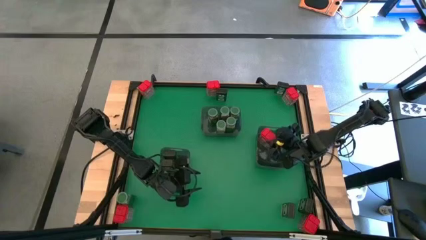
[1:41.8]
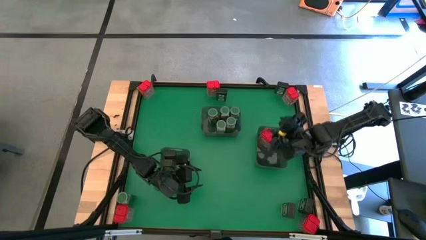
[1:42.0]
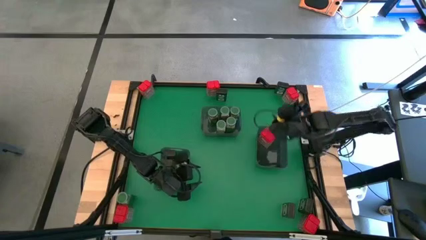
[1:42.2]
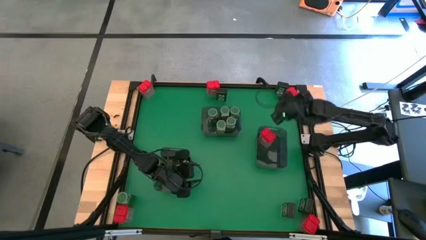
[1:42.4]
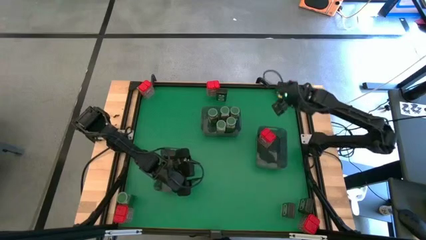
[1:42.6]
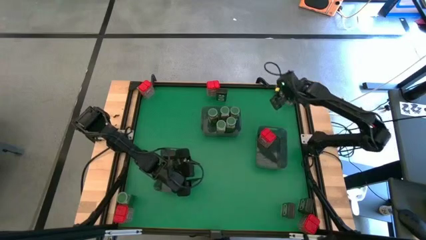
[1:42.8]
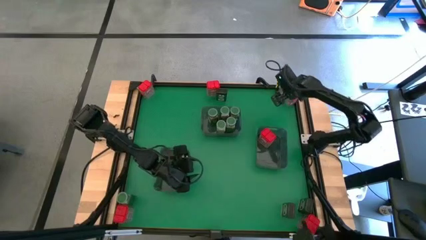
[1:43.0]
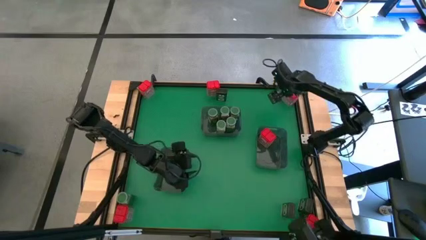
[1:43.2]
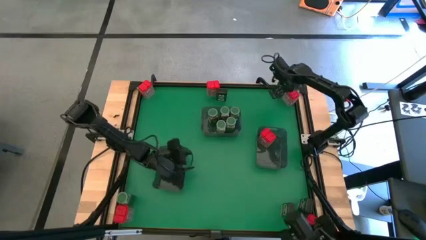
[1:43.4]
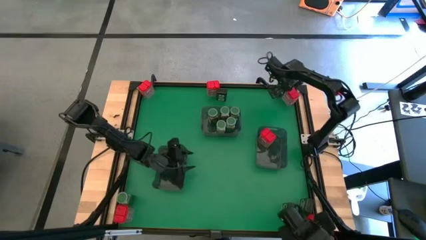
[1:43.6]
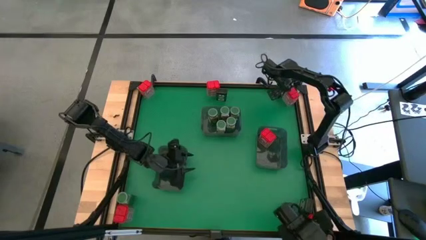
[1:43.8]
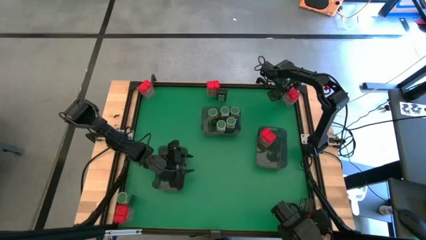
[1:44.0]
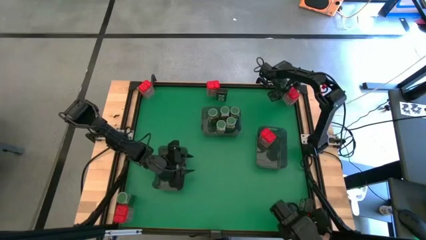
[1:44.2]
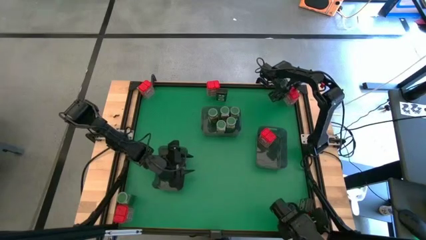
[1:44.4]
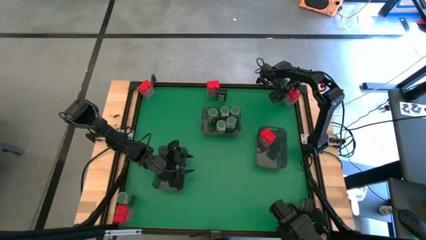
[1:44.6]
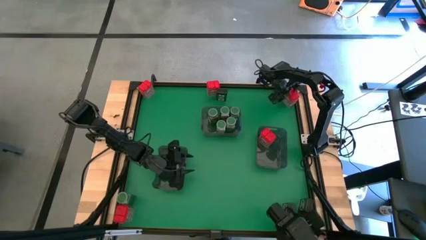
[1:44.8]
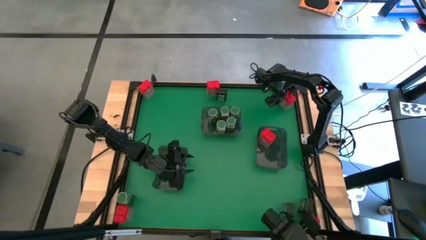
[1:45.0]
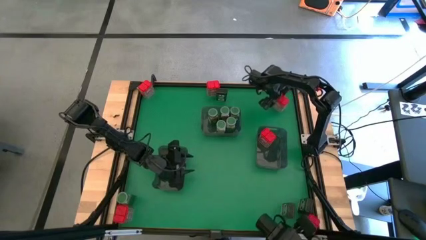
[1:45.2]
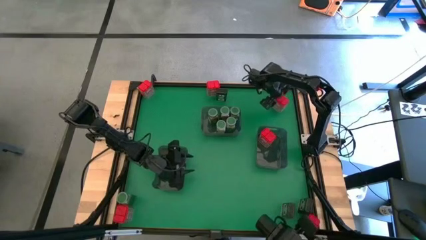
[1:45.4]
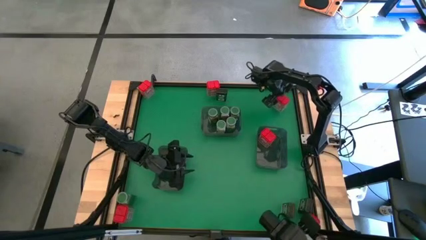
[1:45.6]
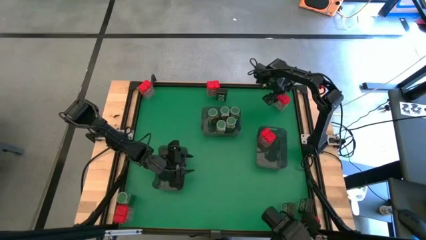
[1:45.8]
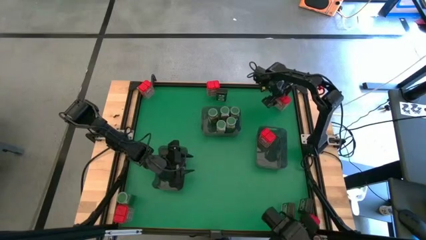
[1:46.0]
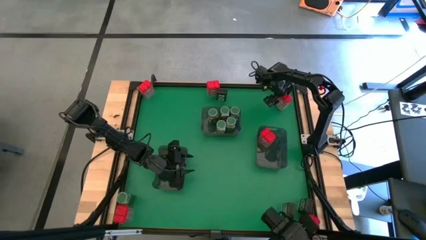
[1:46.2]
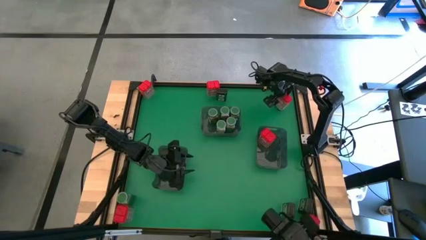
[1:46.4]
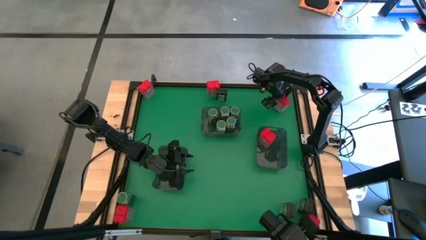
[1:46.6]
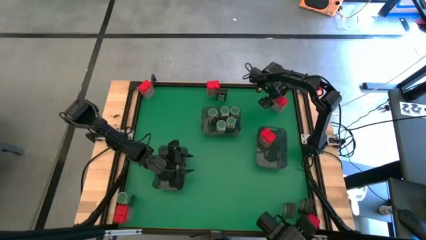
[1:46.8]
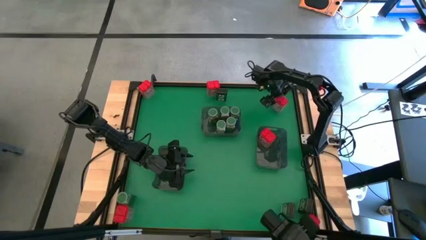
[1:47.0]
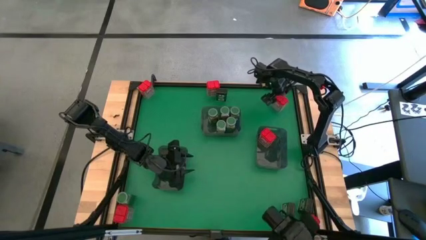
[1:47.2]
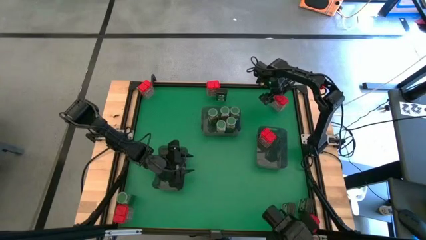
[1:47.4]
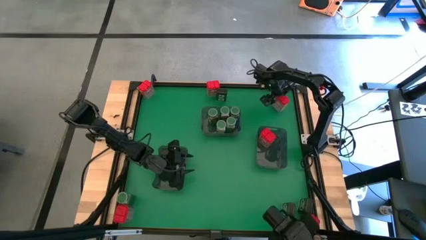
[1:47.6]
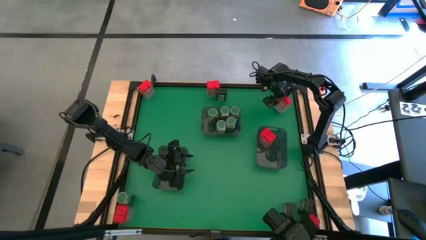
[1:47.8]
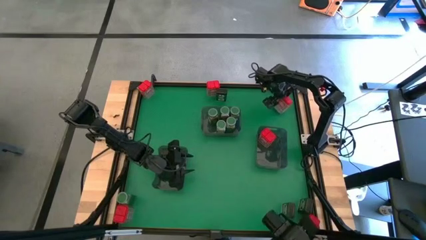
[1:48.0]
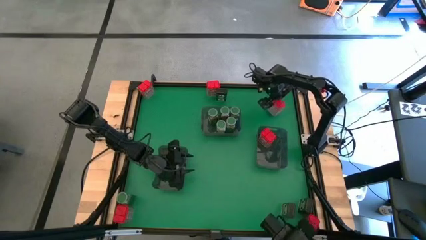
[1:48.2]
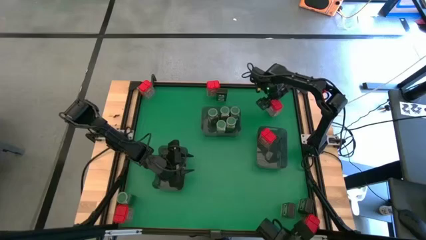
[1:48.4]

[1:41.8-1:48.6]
Task: Sort spices by type
Put the red seasoning can into the right black bin

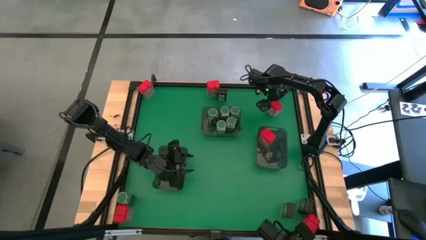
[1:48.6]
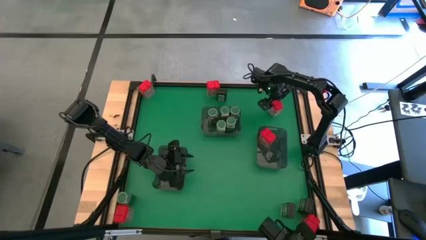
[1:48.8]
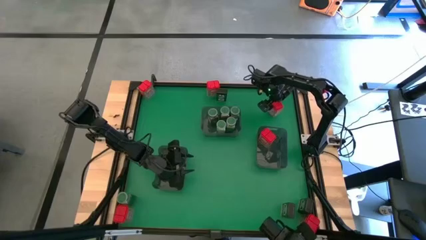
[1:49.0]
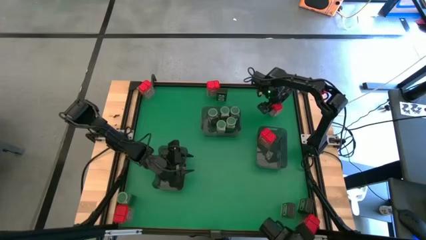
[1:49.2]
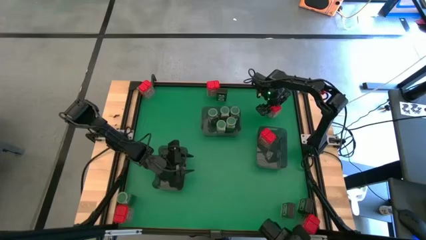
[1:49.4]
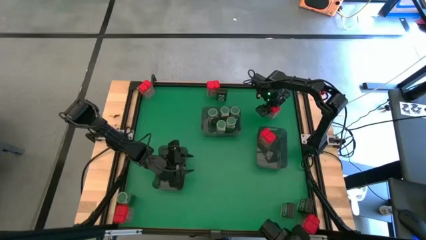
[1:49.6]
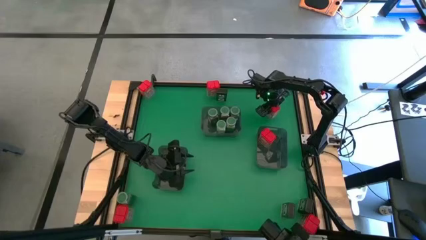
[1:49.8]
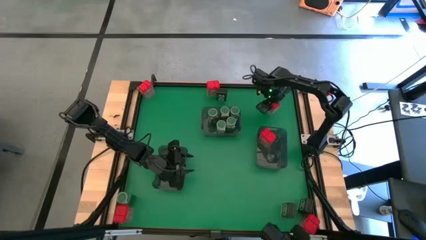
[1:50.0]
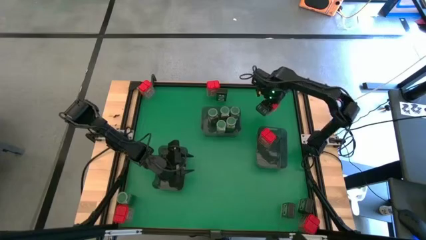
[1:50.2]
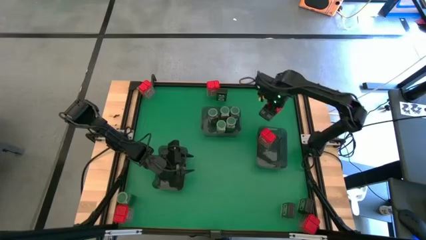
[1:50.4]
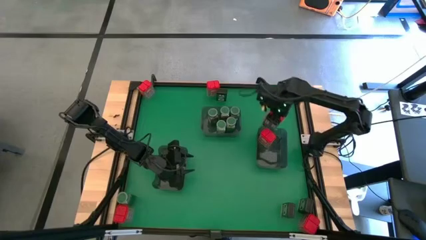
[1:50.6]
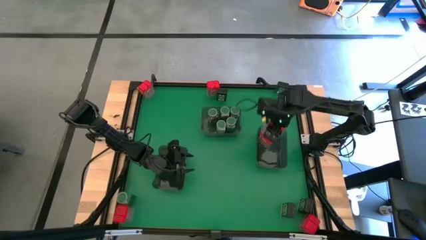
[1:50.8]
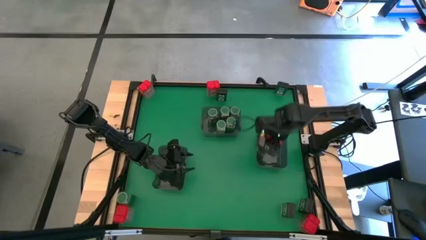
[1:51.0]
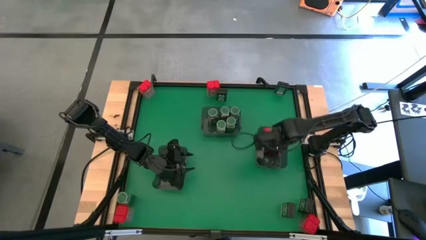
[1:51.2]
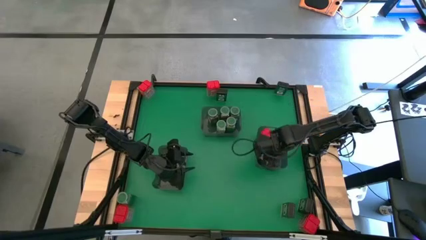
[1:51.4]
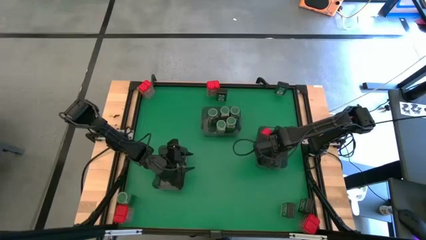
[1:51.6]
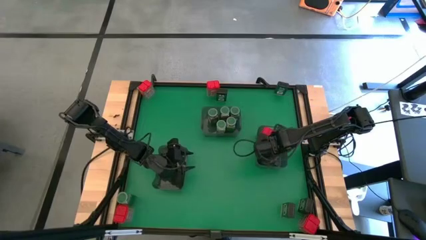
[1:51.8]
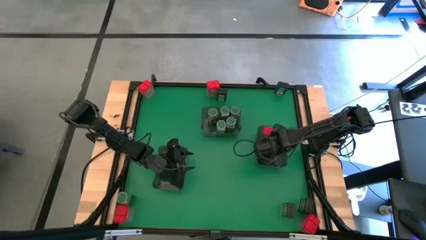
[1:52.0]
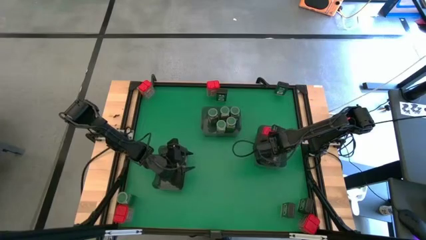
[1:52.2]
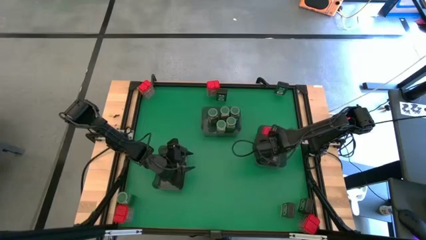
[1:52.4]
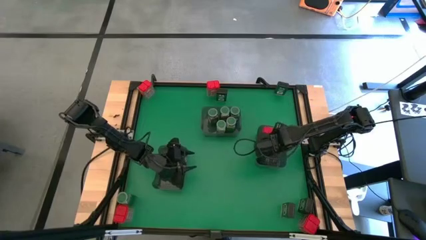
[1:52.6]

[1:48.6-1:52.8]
Put the red seasoning can into the right black bin

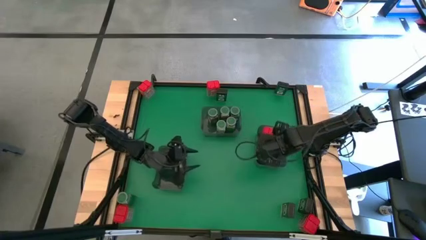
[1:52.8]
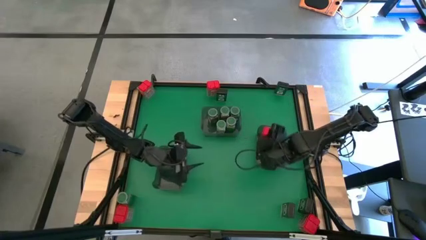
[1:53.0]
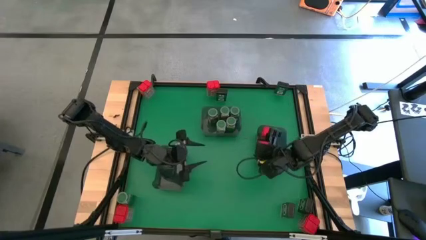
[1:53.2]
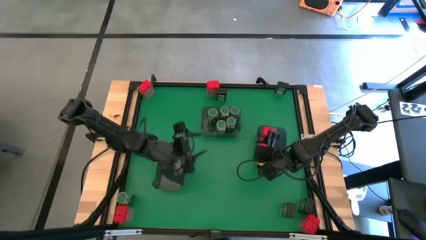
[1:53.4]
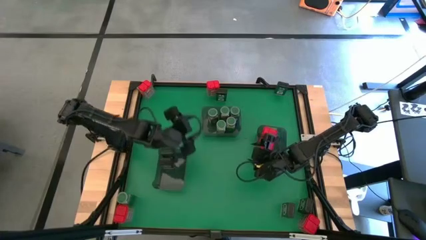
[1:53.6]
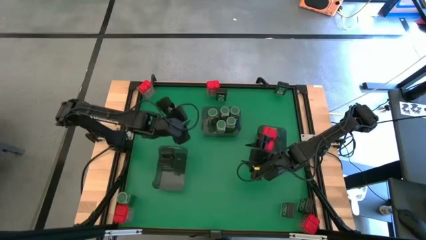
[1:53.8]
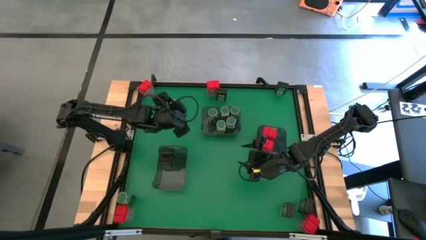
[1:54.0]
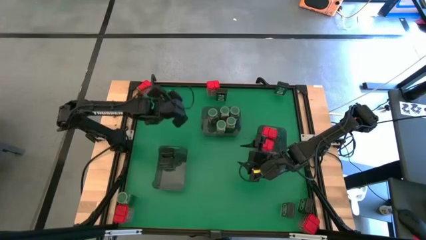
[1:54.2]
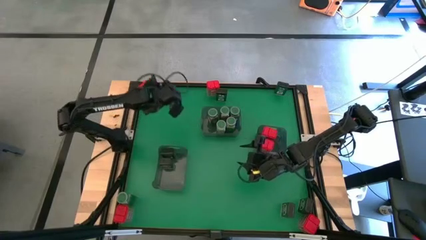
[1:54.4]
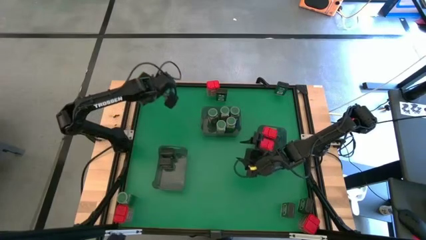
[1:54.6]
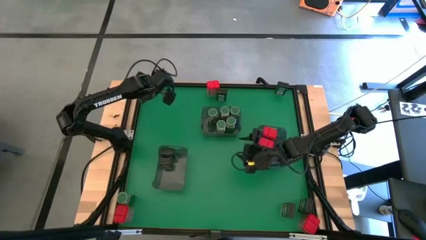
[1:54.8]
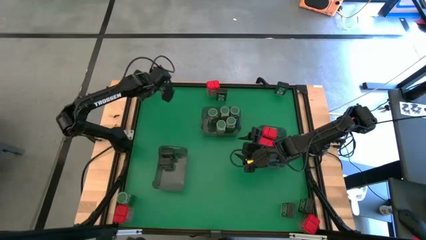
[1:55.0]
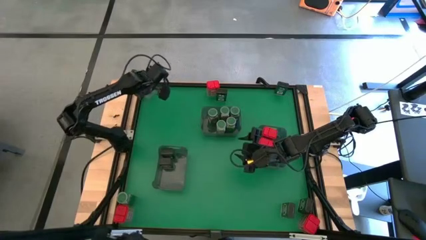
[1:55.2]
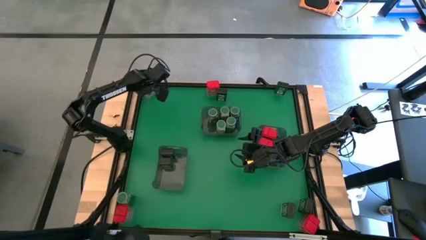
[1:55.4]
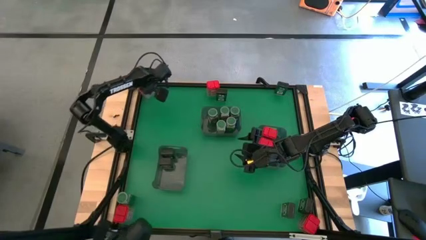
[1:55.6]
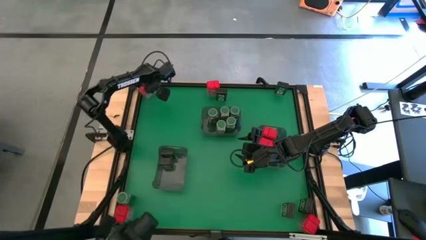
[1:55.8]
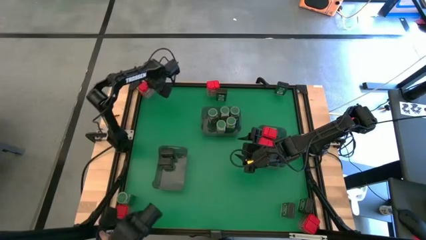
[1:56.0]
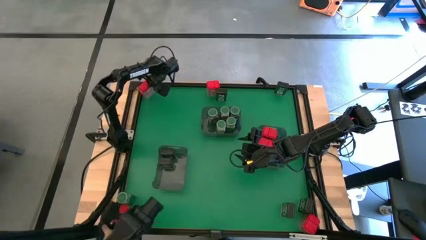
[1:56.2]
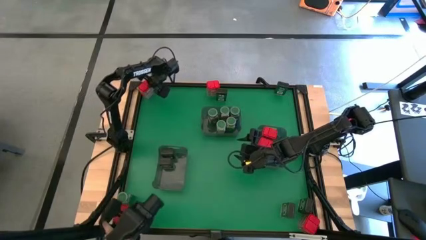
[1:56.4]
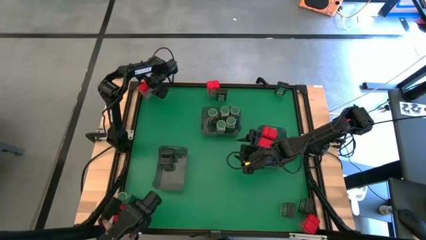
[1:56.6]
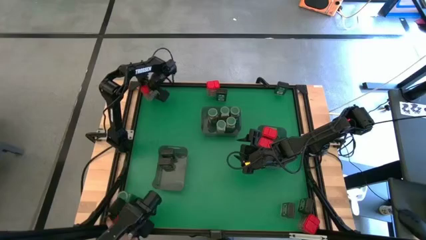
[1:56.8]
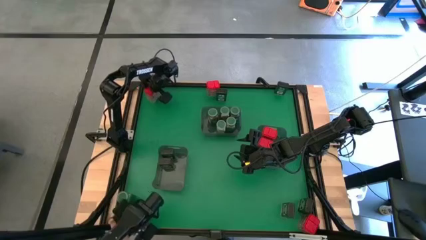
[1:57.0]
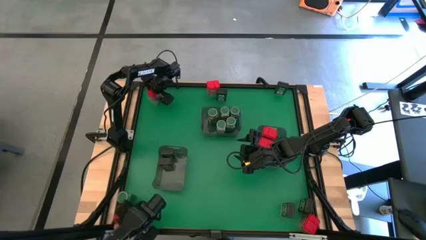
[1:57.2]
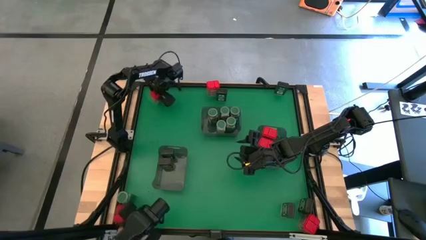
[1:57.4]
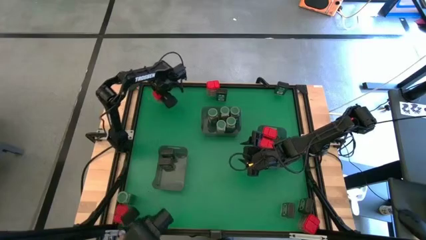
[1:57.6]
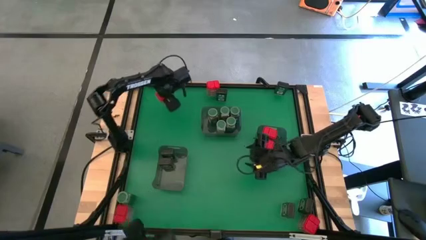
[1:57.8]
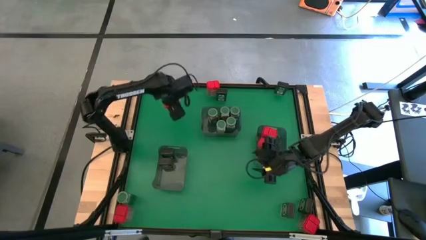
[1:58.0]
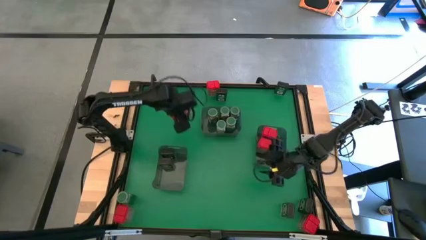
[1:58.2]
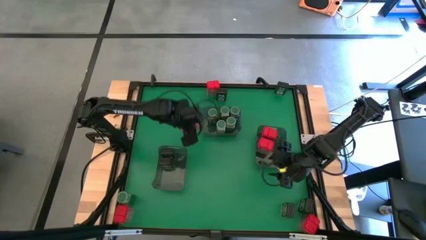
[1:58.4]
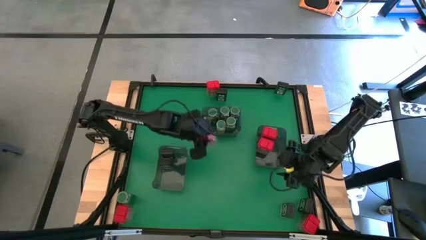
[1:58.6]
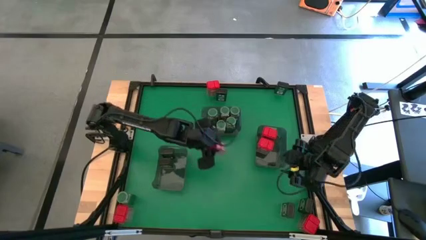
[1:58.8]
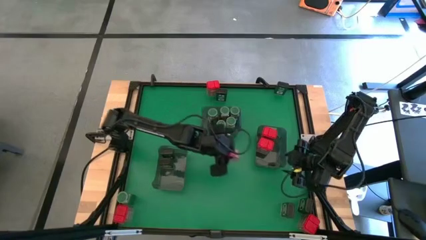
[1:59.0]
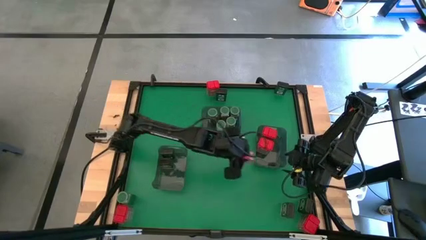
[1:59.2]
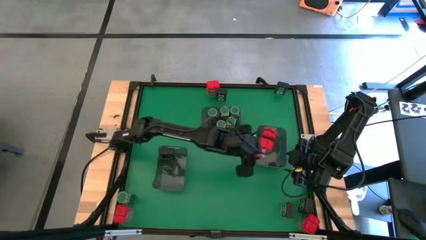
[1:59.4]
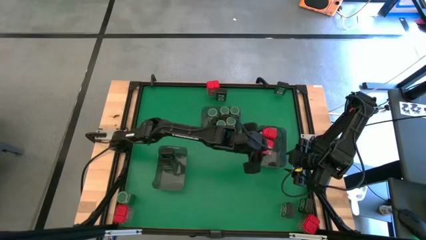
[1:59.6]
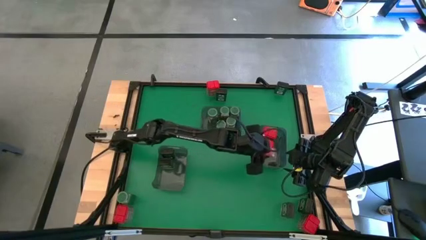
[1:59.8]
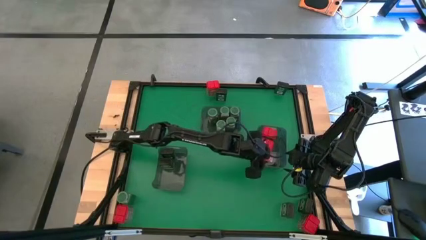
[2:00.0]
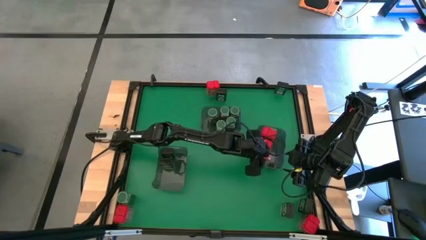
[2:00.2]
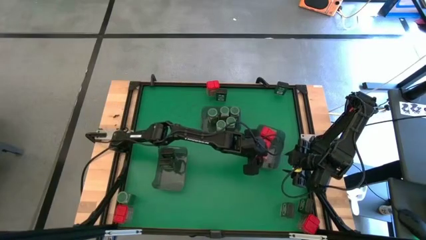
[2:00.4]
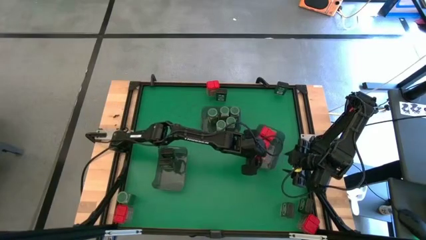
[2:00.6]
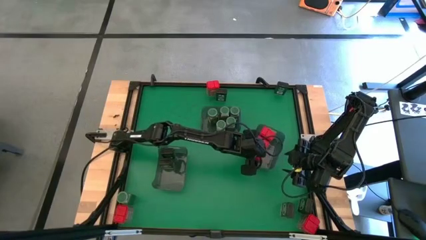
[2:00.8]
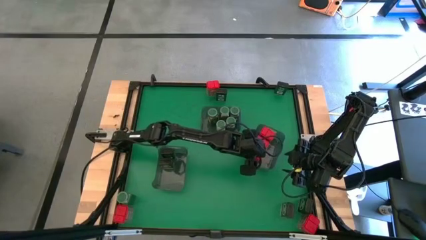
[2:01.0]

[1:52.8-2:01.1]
Put the red seasoning can into the right black bin
